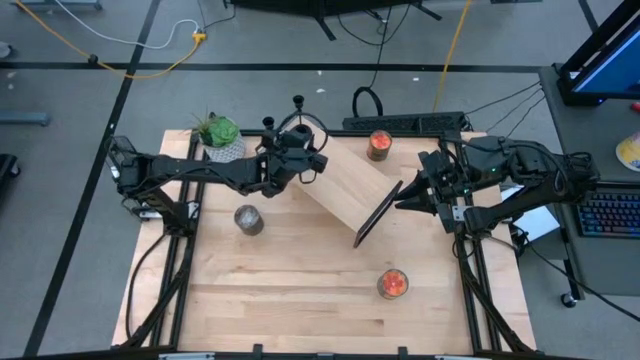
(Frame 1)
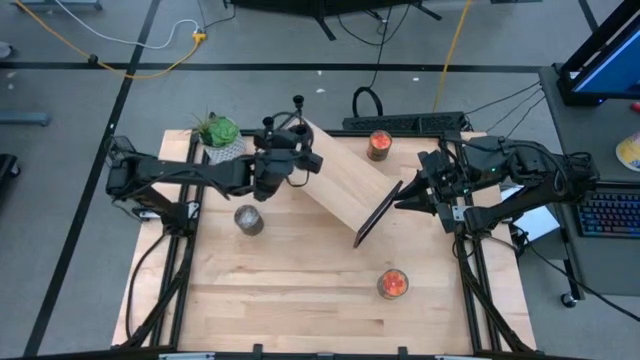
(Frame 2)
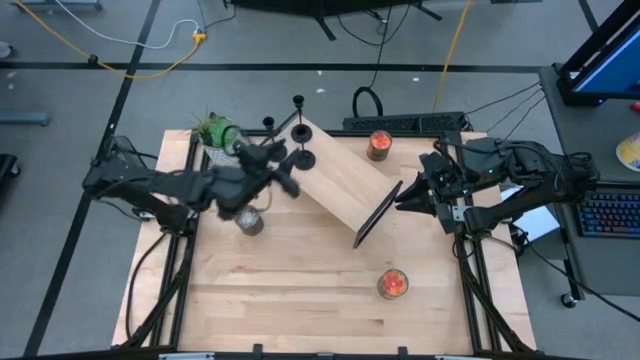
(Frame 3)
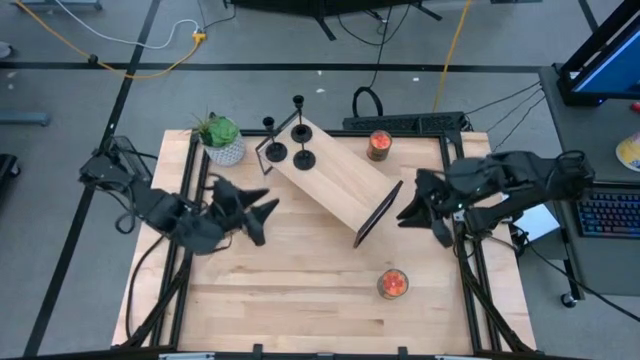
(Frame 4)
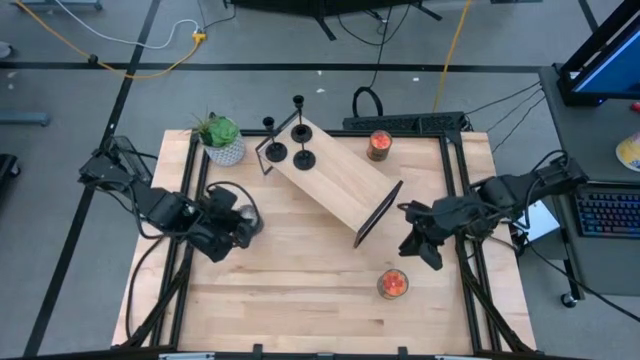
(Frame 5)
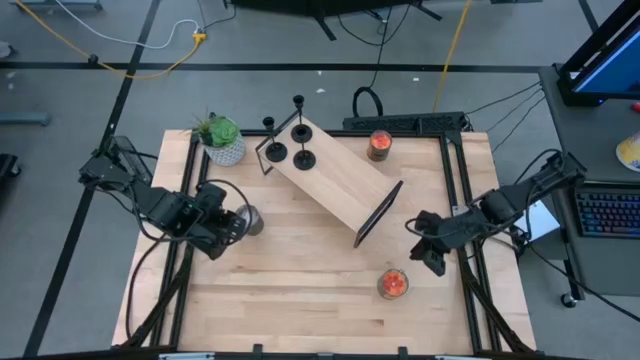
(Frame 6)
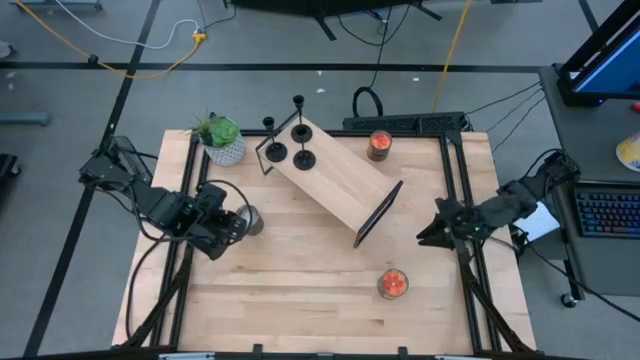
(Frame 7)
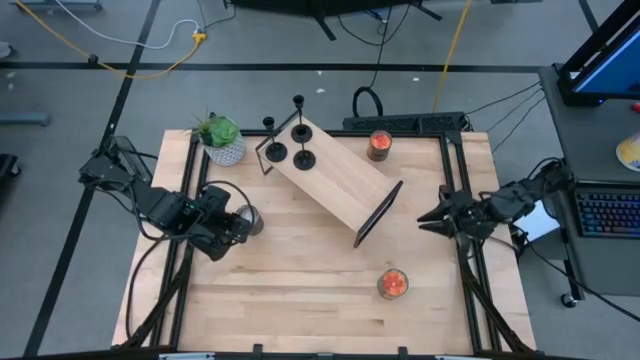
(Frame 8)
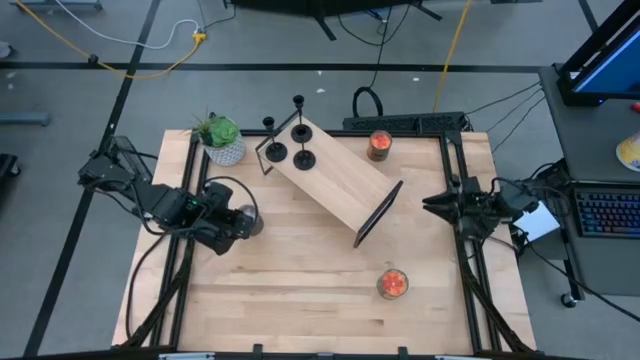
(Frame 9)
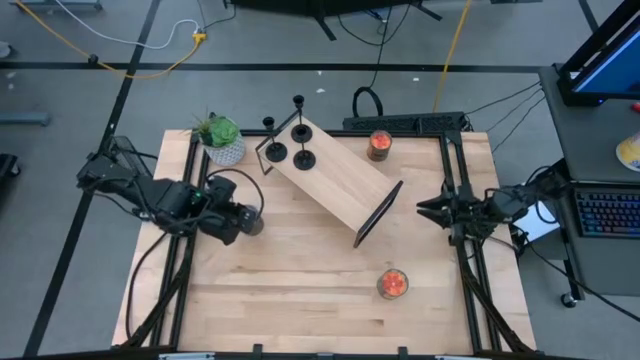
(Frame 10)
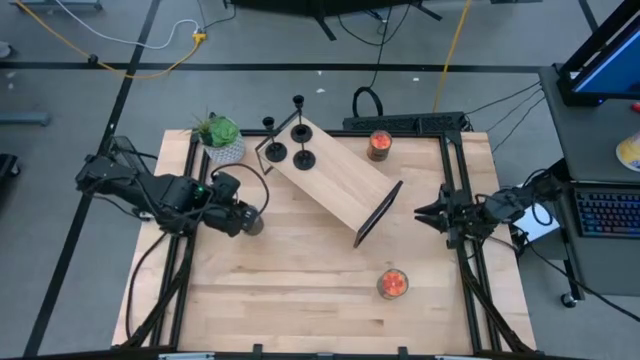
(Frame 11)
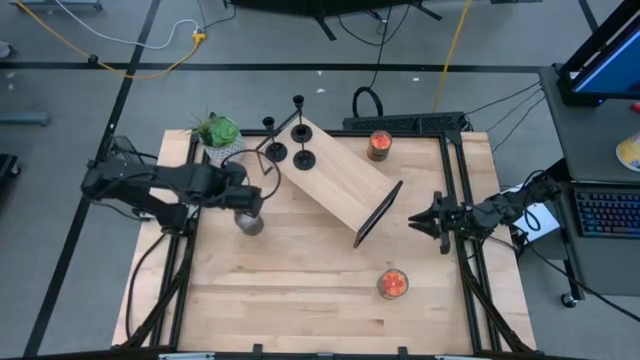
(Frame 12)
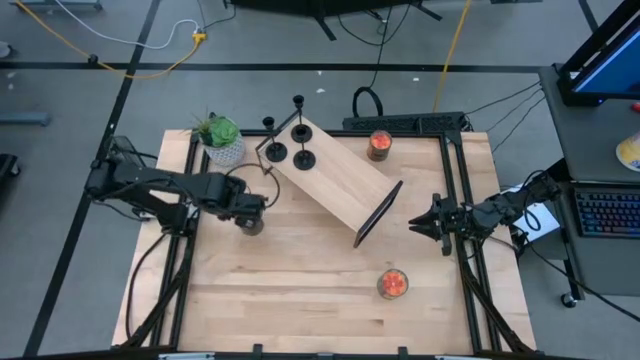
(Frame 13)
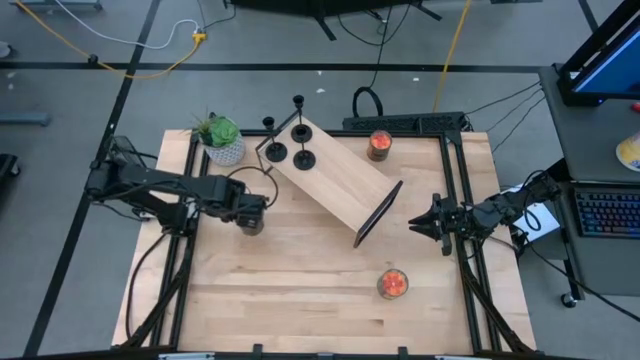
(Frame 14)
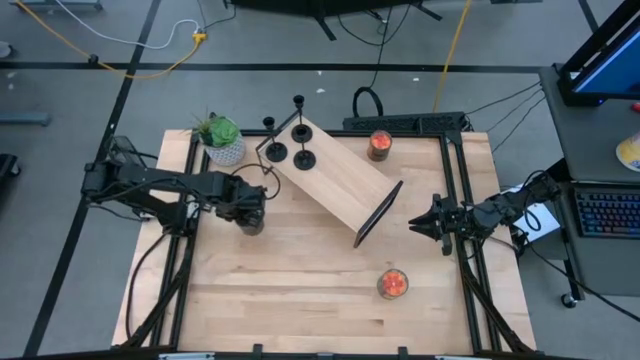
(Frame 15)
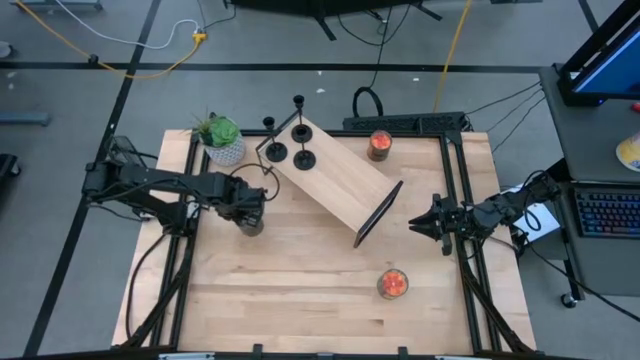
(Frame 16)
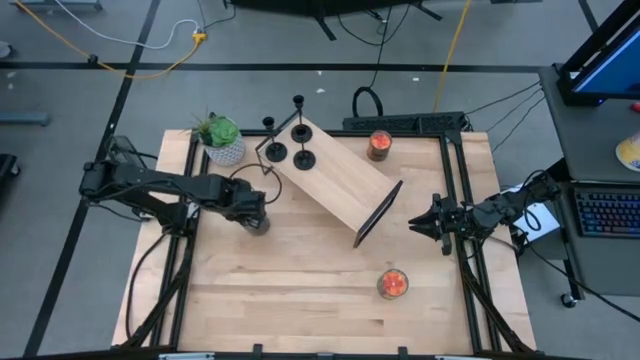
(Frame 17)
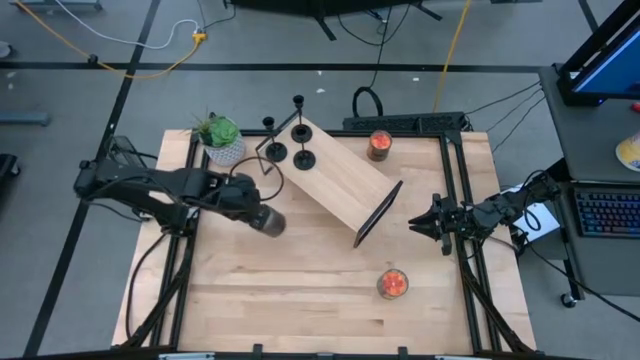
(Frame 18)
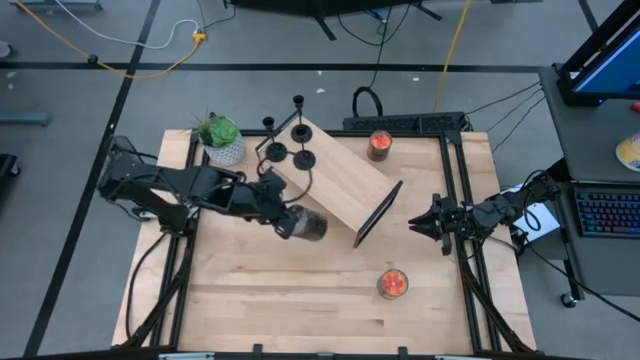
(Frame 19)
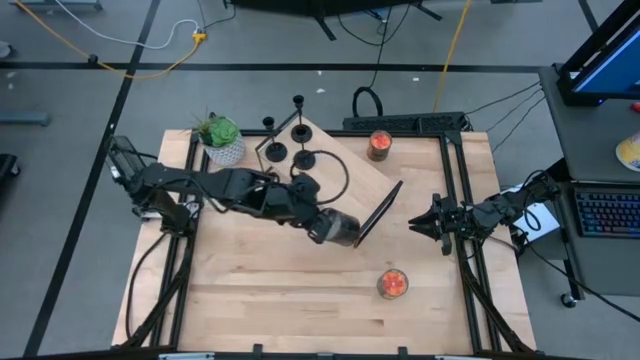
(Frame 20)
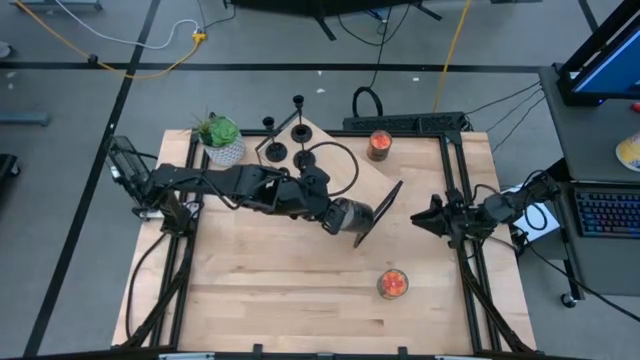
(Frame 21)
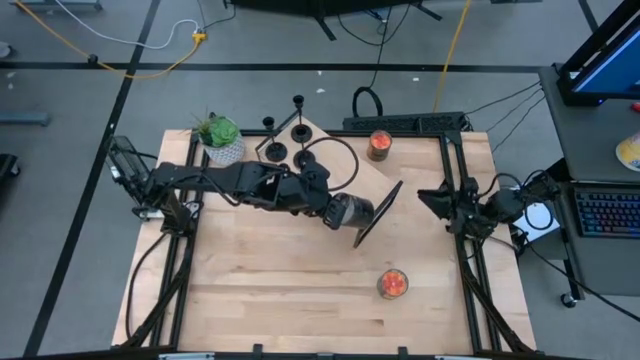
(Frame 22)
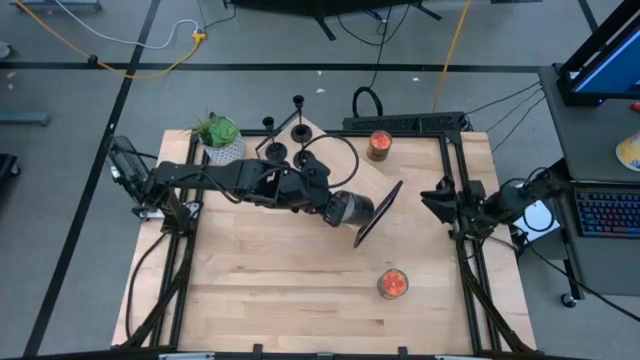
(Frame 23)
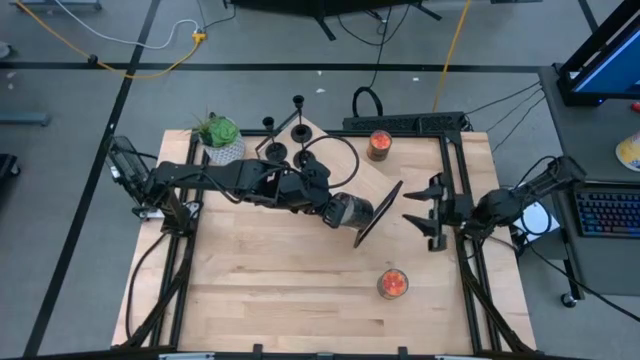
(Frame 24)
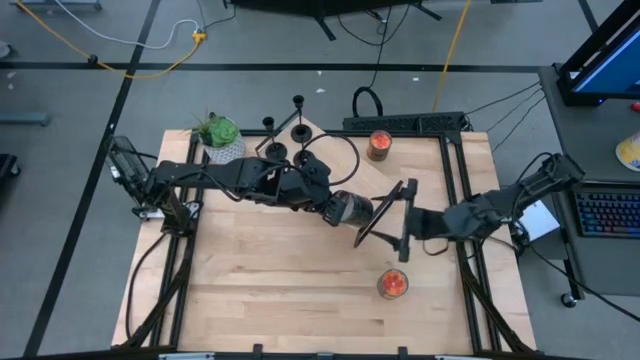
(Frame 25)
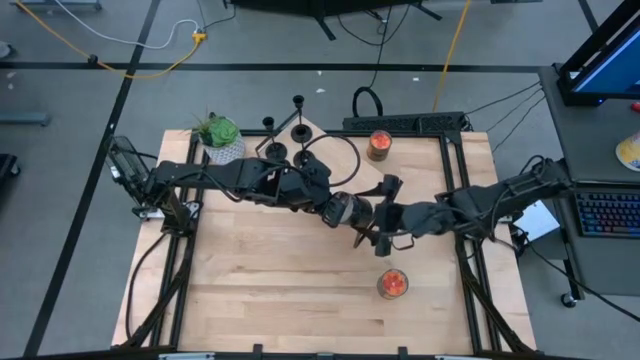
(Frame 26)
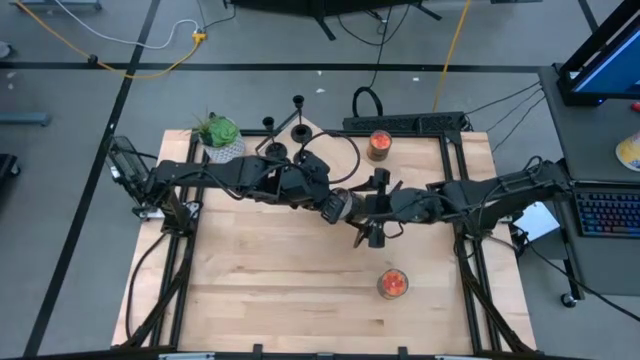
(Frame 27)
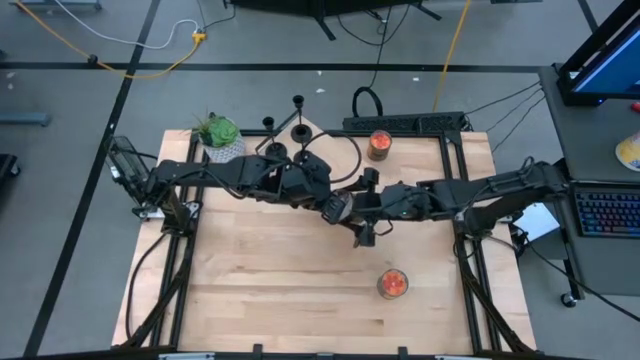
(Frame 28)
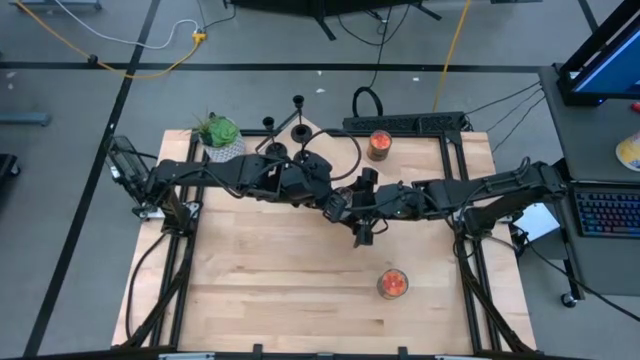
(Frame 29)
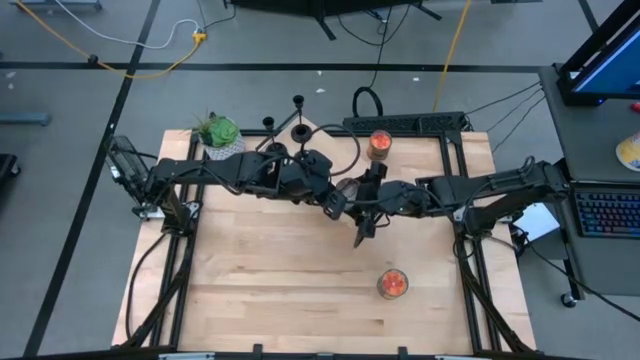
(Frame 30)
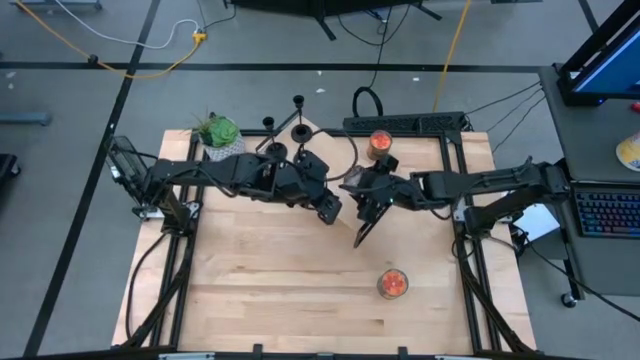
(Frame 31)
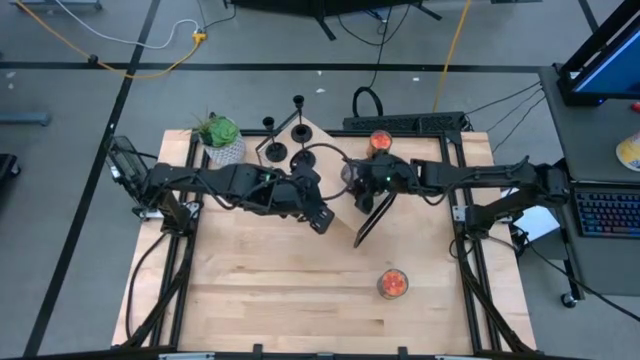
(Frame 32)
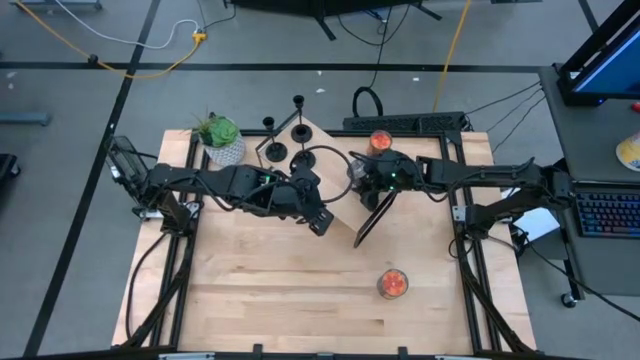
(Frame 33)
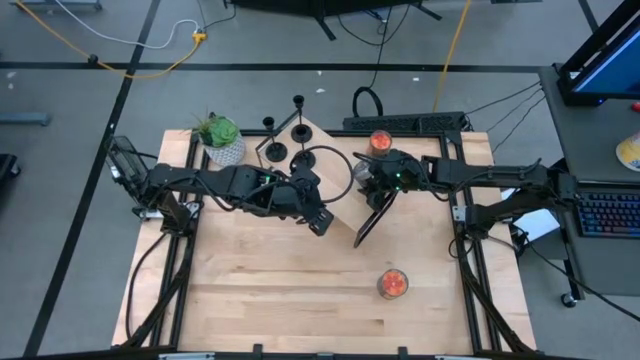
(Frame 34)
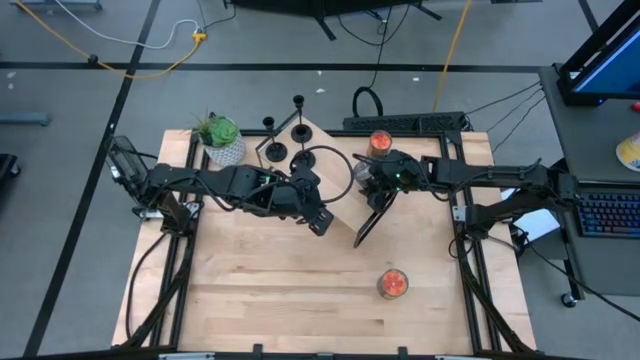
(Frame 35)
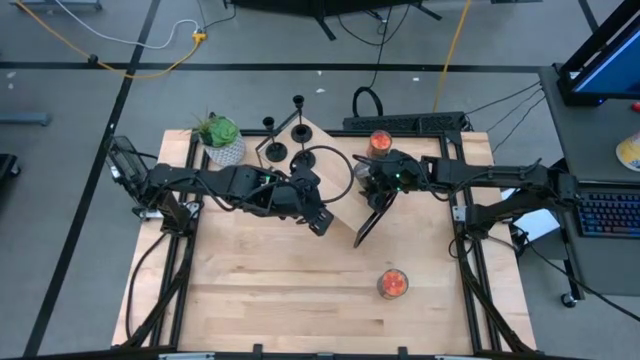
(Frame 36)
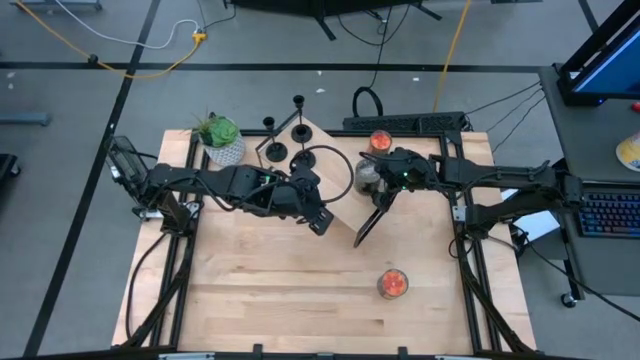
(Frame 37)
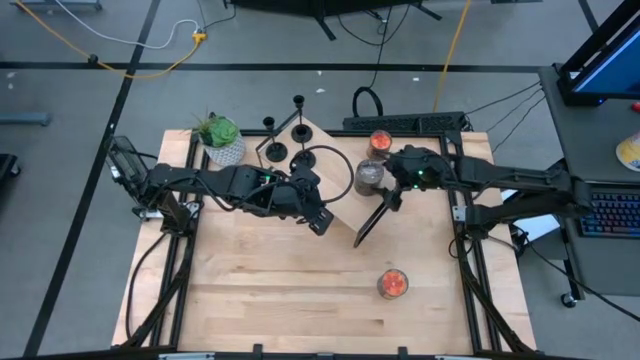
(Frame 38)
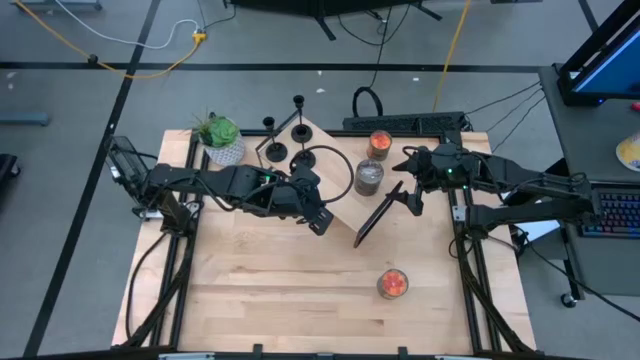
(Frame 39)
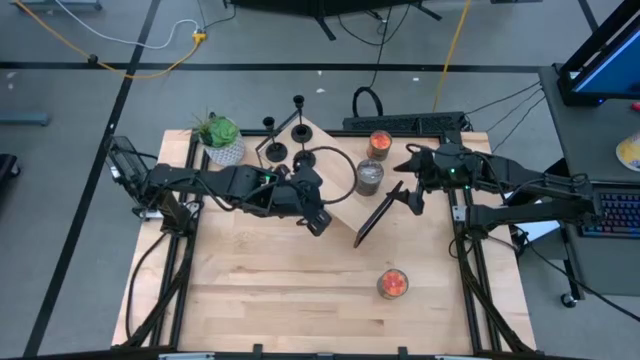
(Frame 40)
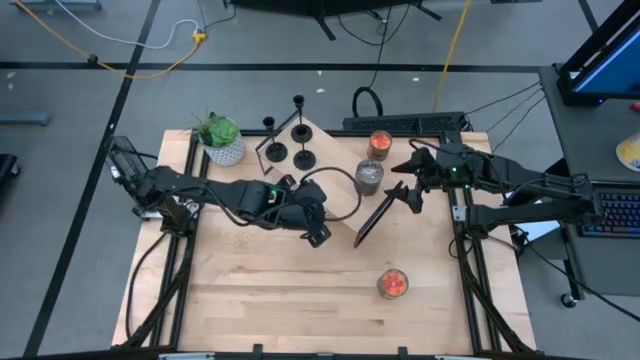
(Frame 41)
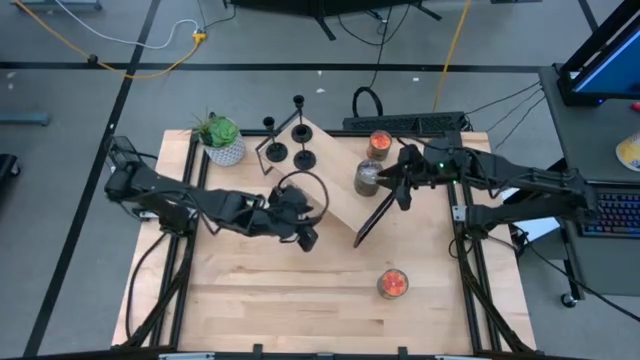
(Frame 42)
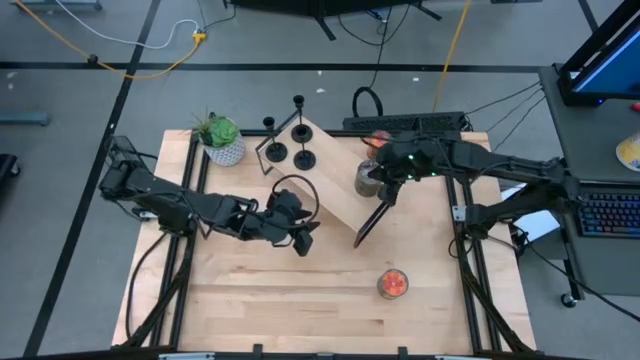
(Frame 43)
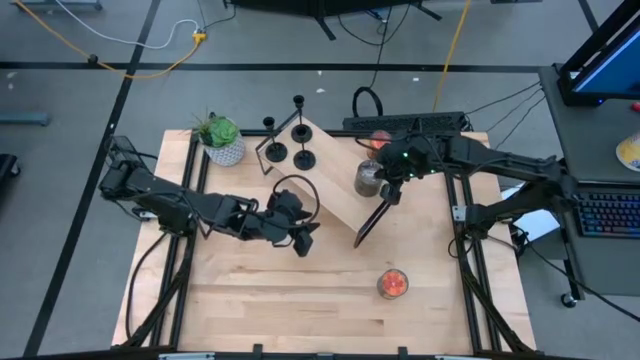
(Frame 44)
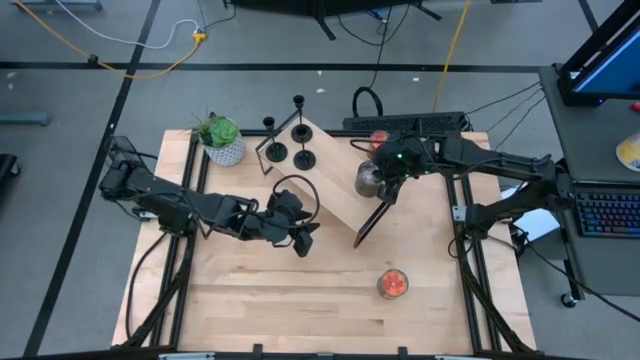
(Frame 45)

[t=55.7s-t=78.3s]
Task: Pick & Place candle stick holders
Put the black scented candle on the shelf
